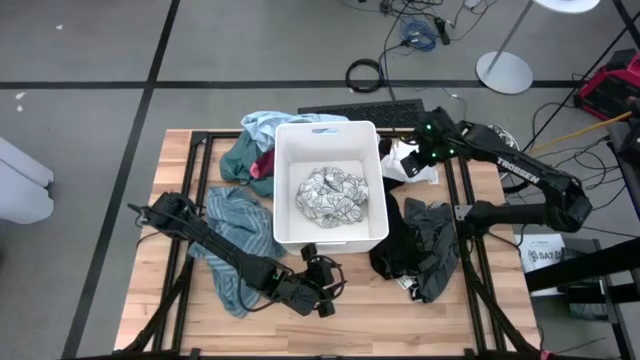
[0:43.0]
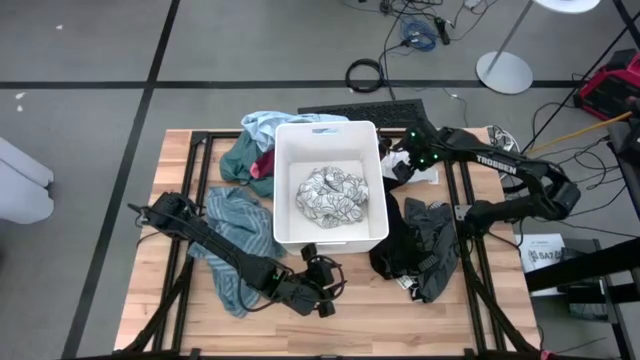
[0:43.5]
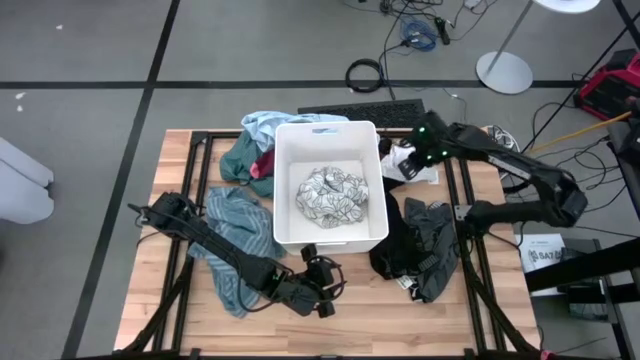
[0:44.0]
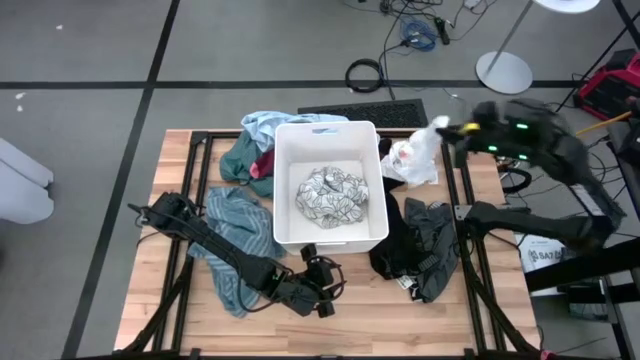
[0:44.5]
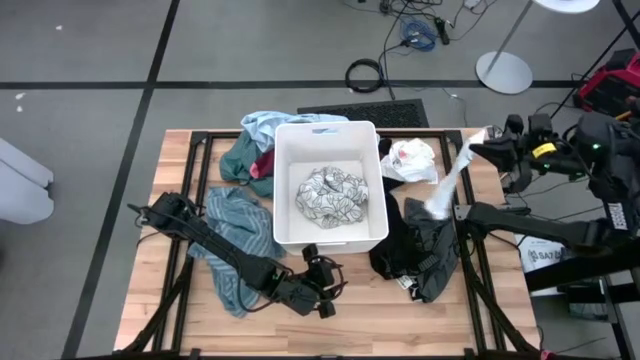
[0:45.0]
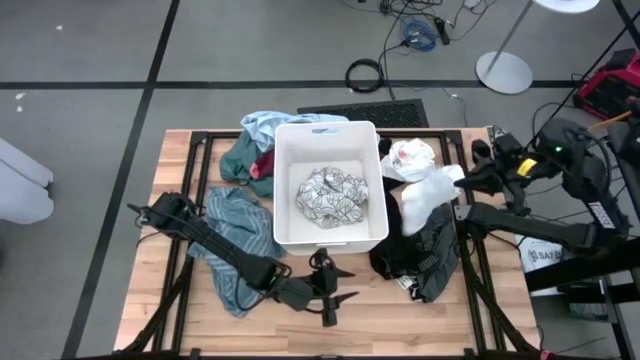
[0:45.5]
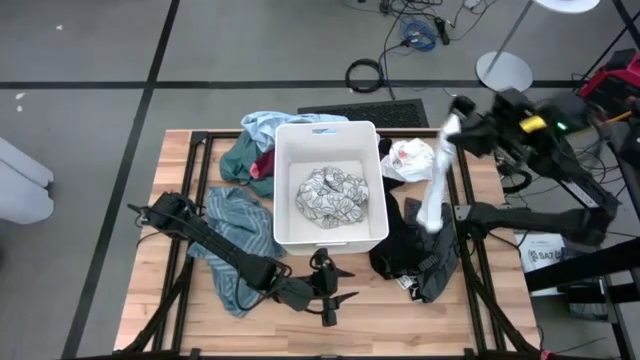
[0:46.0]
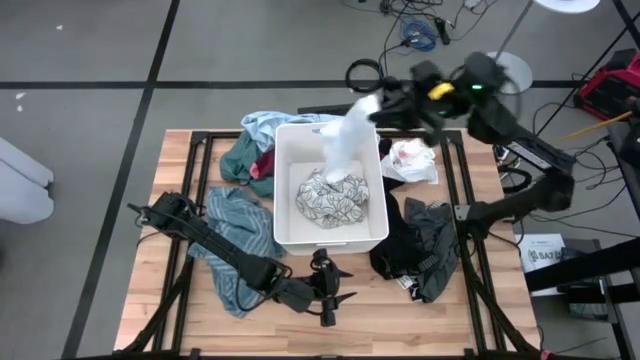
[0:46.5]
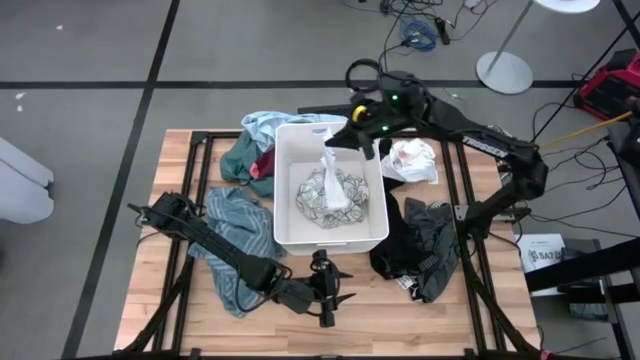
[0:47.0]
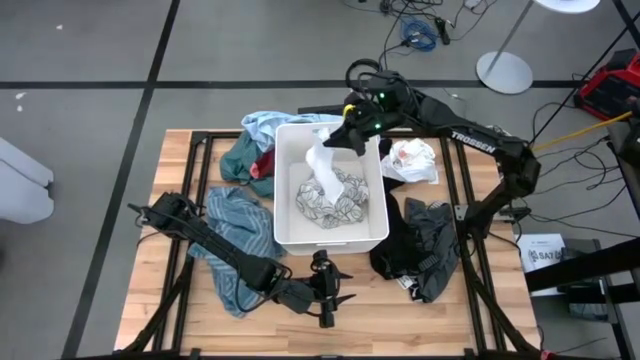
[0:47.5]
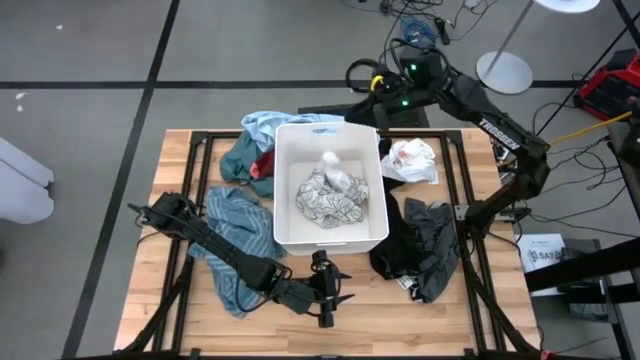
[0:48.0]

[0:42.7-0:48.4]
Task: Sort clothes
Put the top white sock into the white laundry organizer

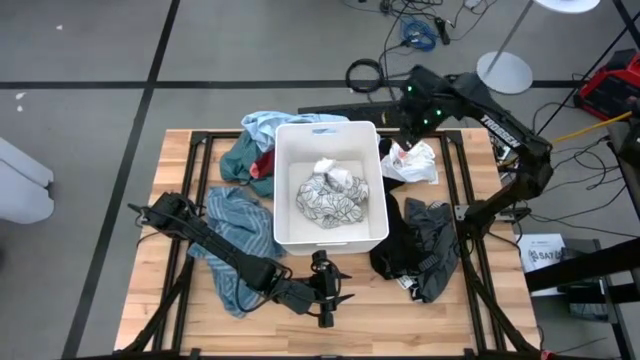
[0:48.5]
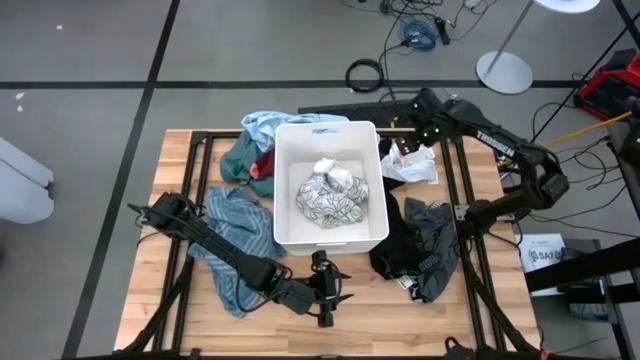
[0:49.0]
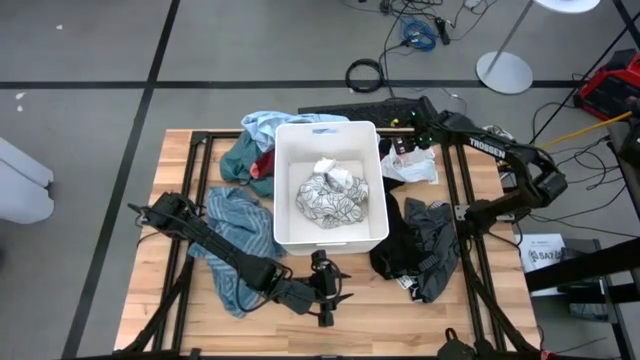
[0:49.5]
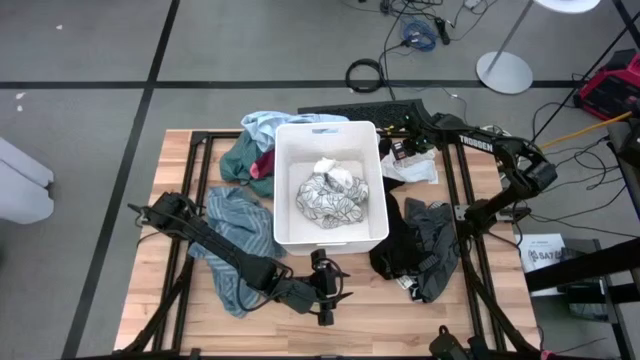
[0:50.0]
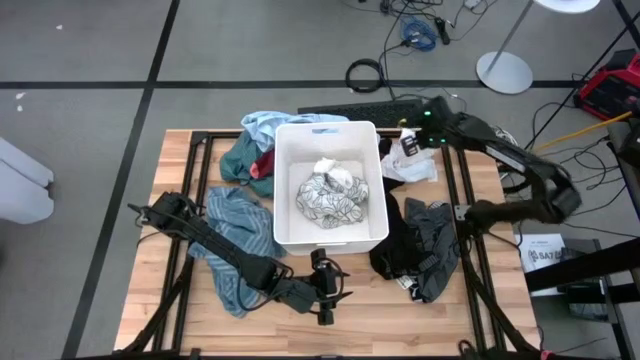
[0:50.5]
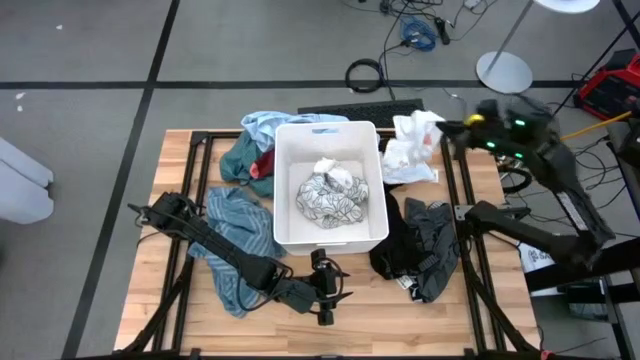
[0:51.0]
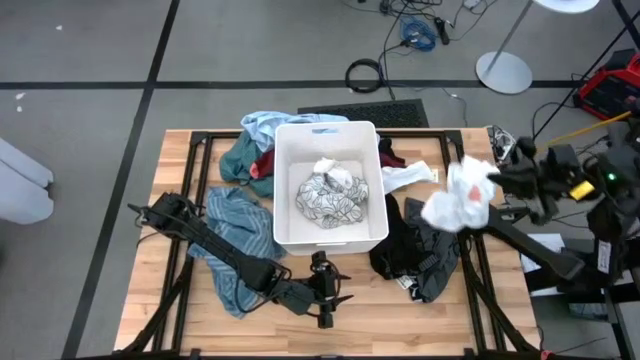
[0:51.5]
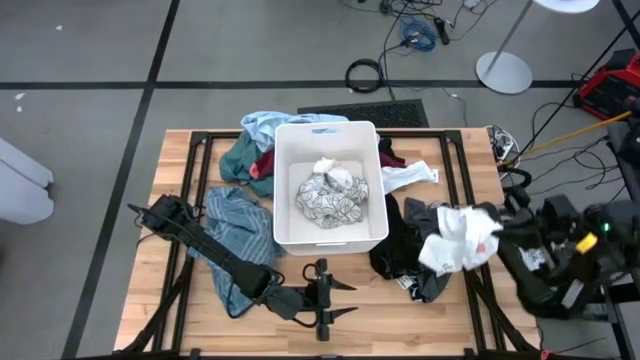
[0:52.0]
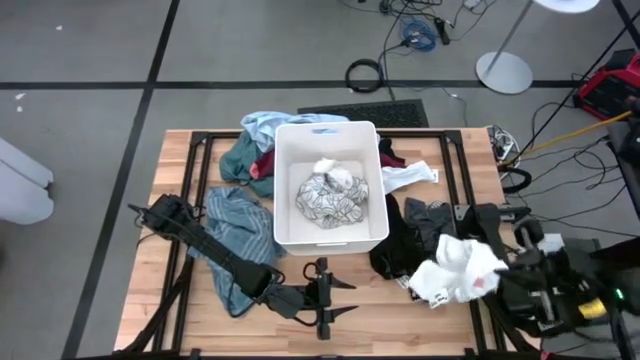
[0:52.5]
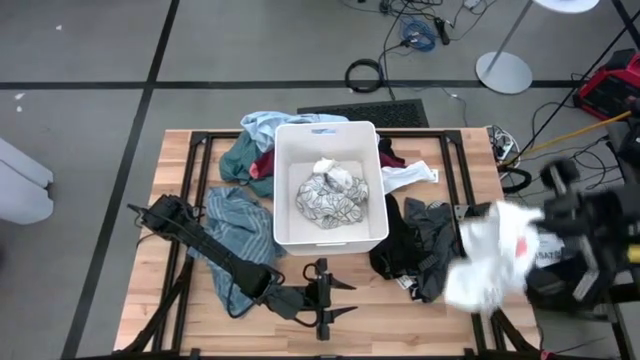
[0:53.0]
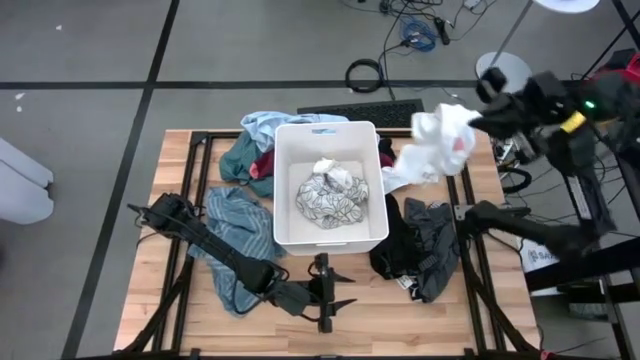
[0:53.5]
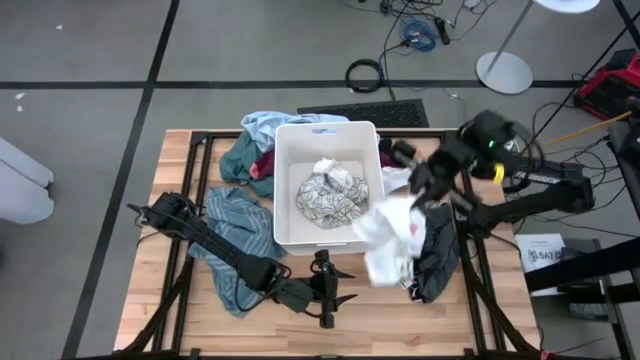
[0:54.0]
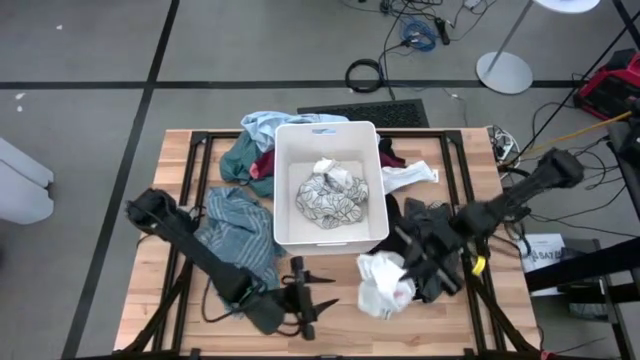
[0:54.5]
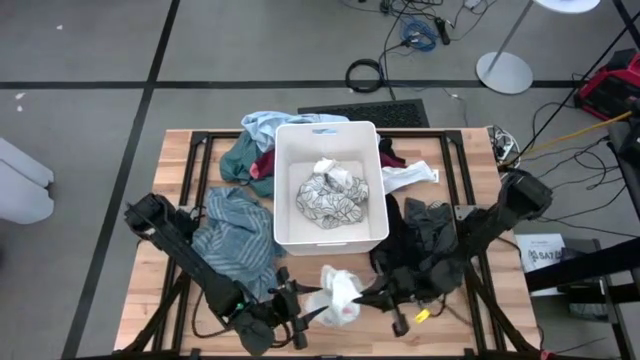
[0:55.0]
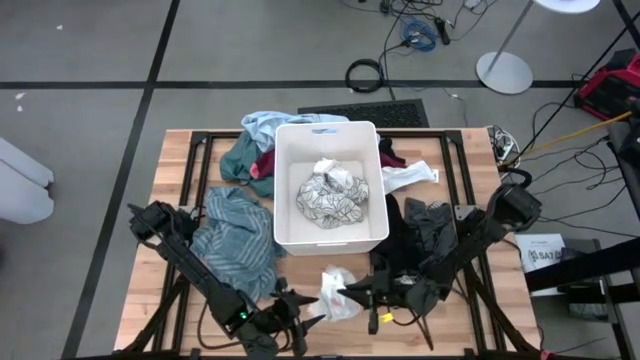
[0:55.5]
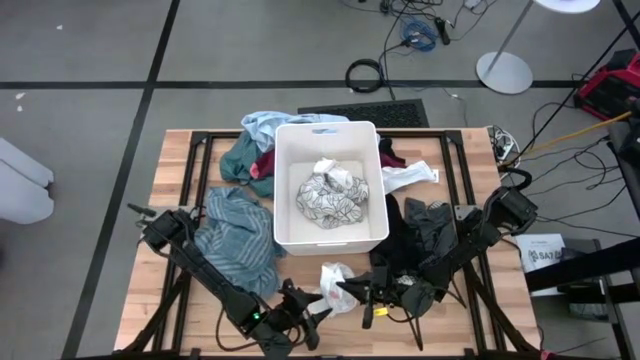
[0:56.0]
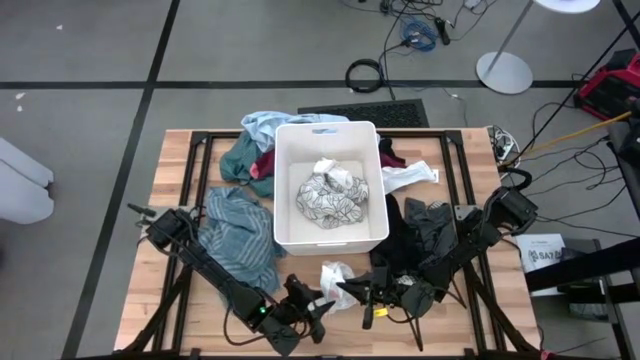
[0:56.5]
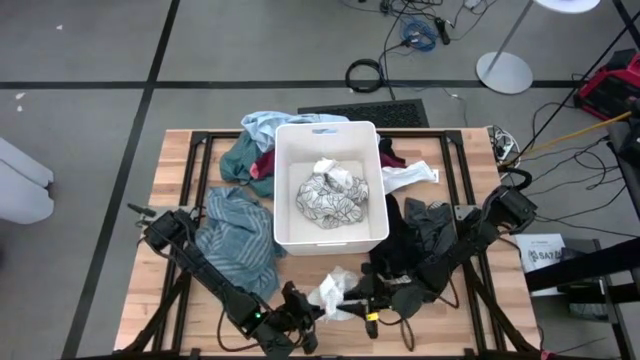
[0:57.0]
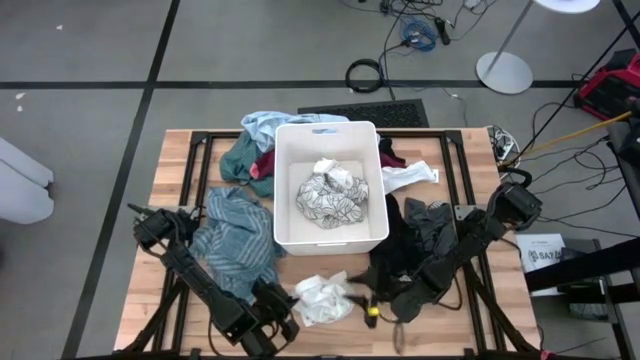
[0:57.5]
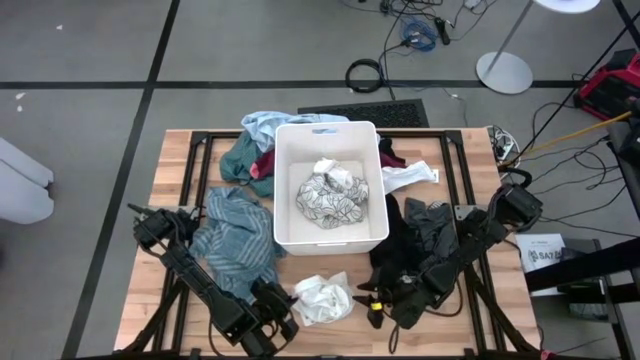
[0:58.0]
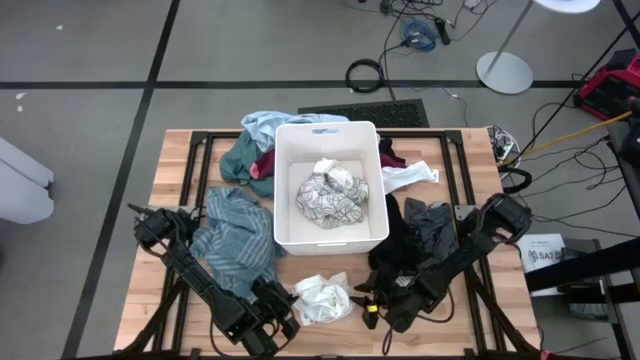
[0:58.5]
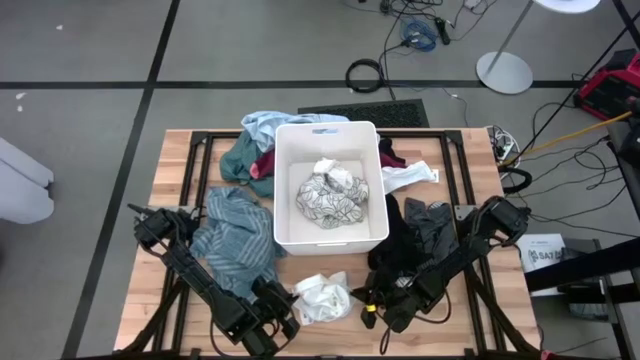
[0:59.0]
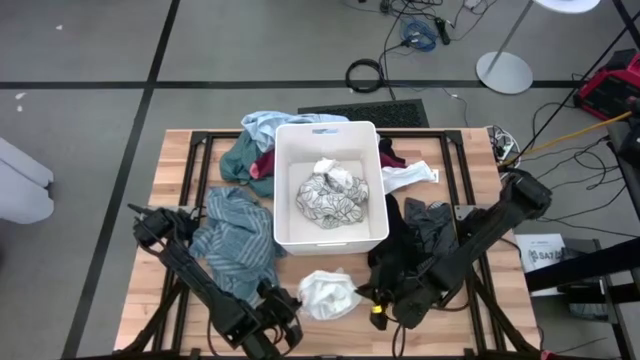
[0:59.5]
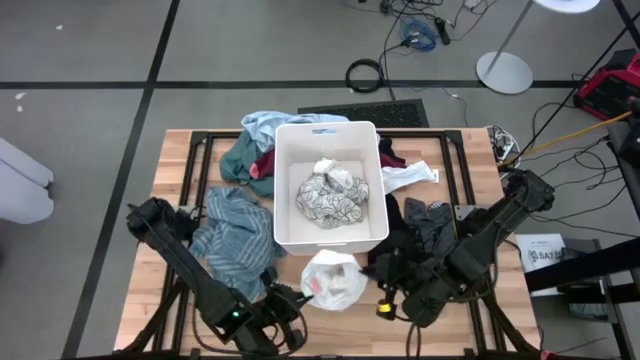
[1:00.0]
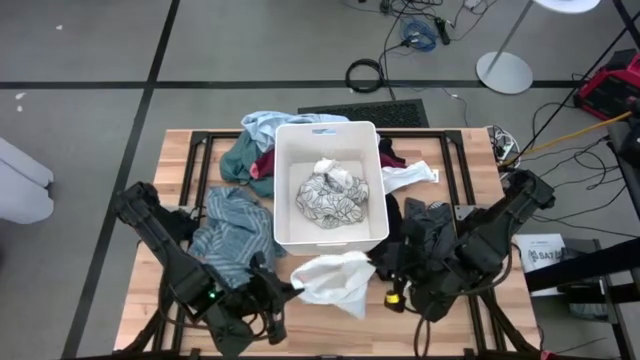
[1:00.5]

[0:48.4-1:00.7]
Put the white short into the white laundry organizer

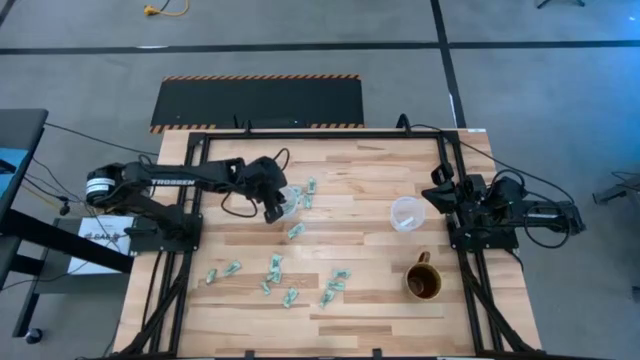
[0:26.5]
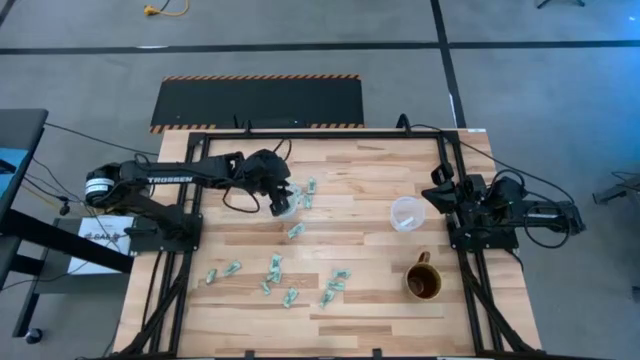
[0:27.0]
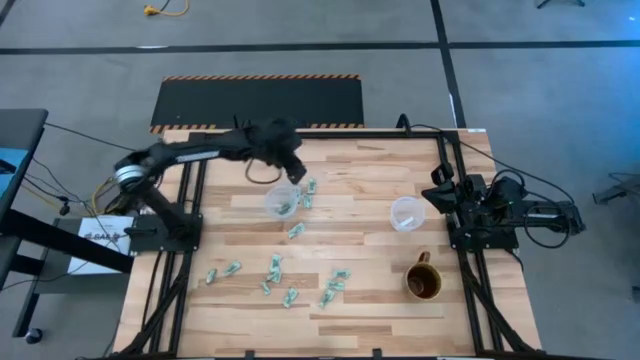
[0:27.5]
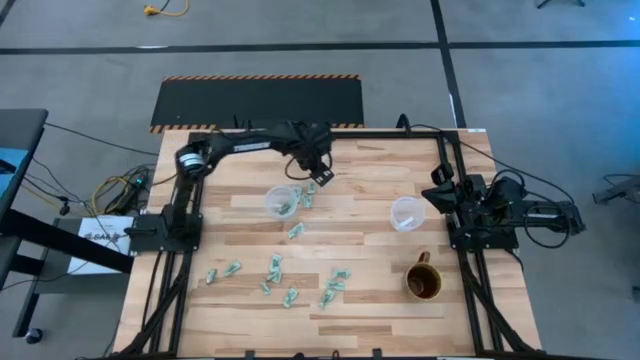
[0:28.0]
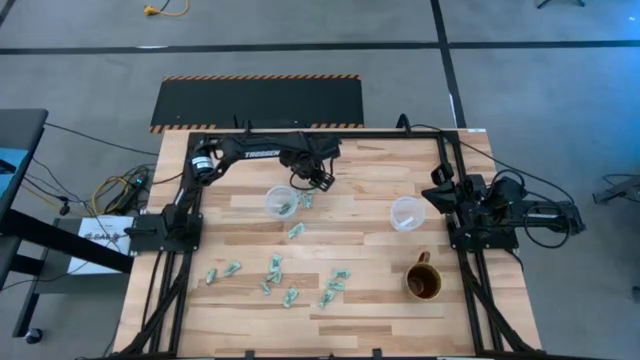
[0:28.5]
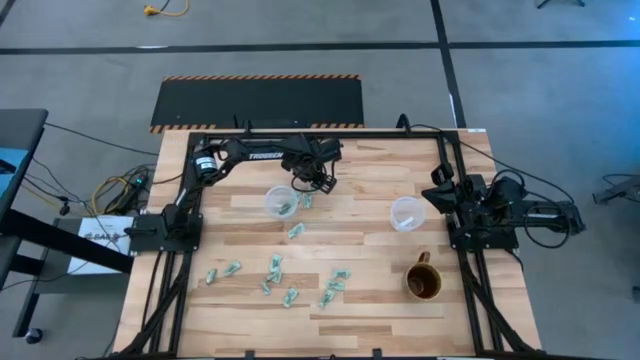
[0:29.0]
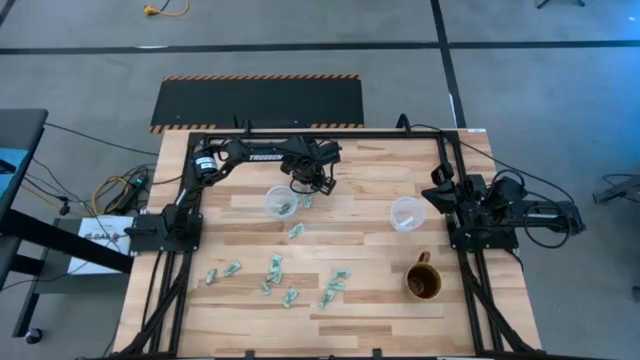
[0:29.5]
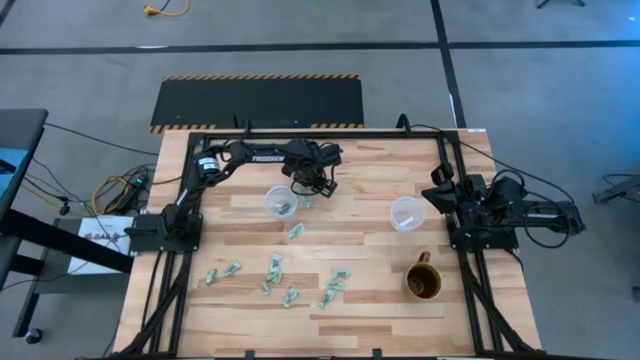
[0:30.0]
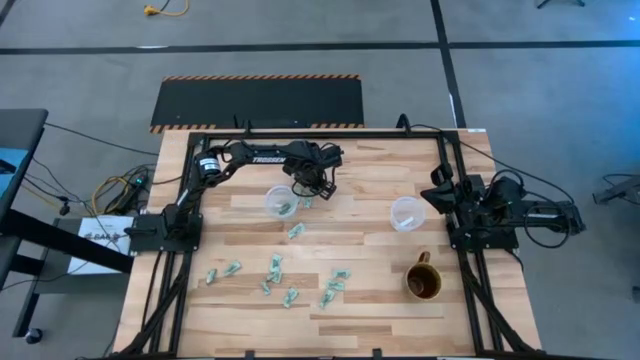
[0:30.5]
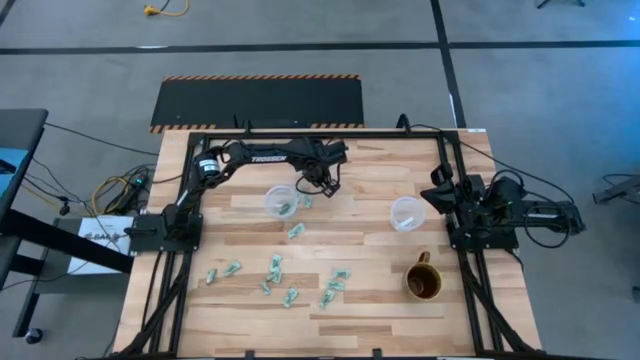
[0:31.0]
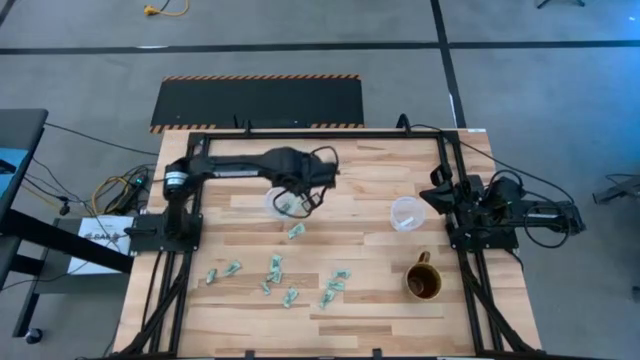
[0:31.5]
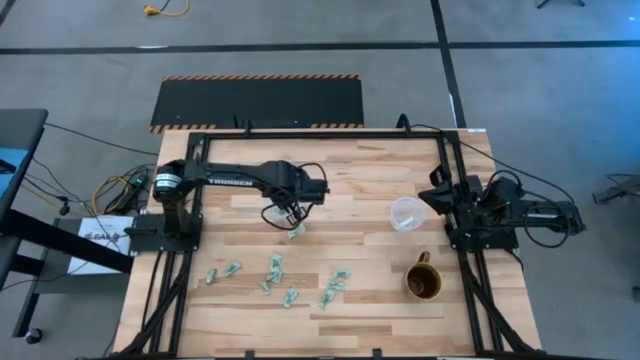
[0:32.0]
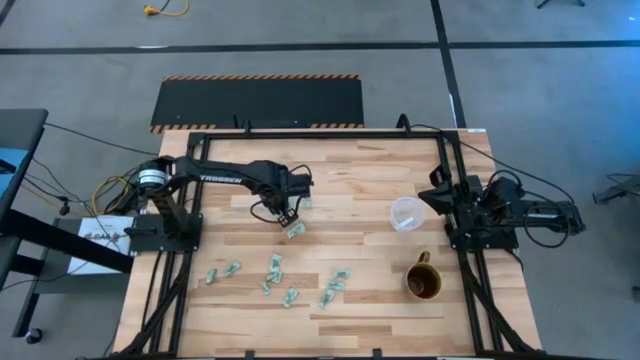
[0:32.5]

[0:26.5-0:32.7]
Task: Pick and place Stevia / Truvia into bins
Put the white stevia packet into the left transparent container
